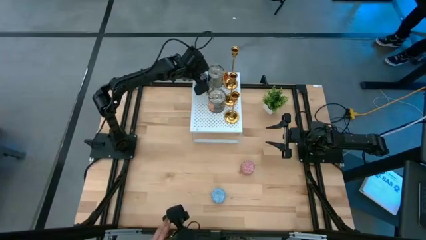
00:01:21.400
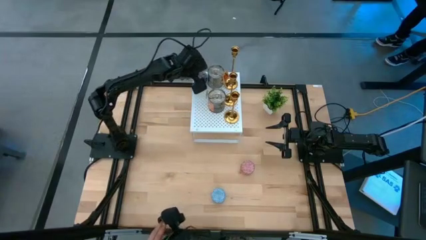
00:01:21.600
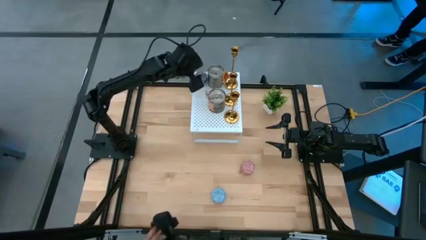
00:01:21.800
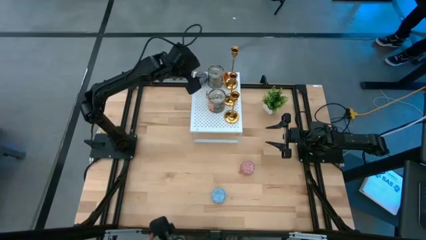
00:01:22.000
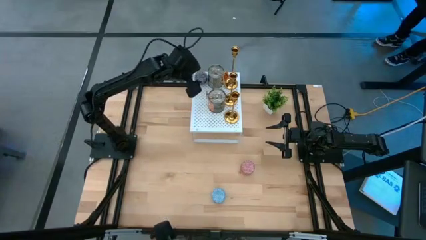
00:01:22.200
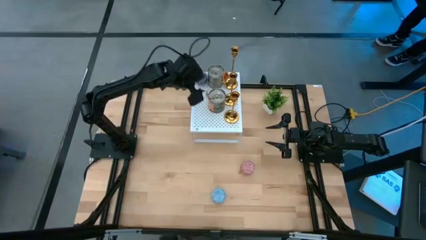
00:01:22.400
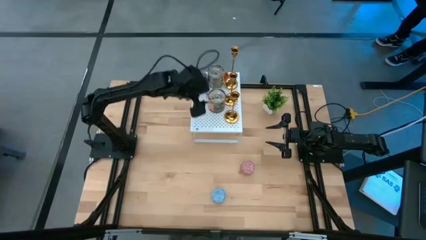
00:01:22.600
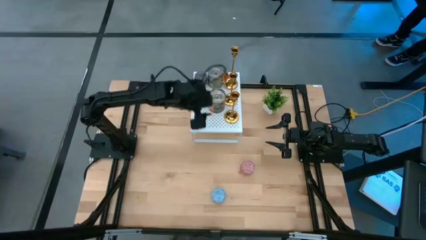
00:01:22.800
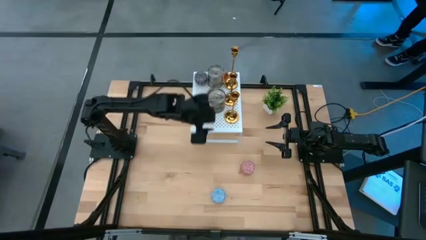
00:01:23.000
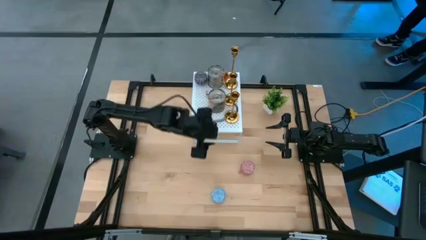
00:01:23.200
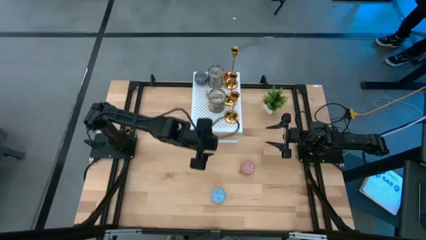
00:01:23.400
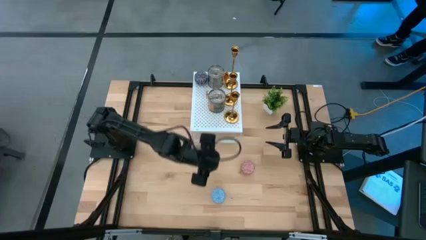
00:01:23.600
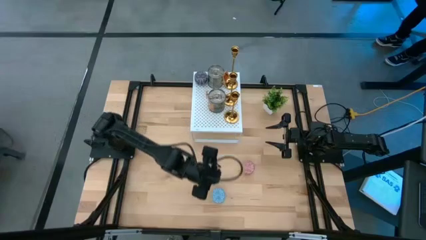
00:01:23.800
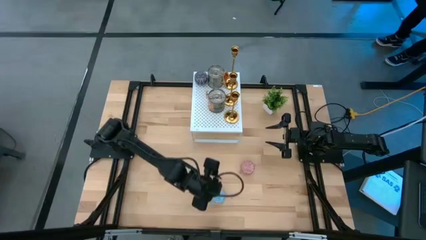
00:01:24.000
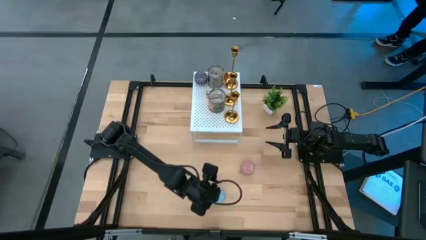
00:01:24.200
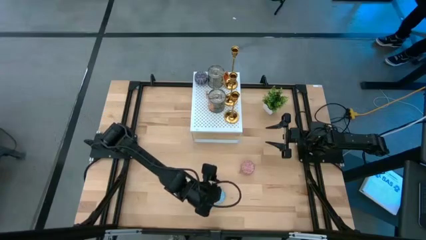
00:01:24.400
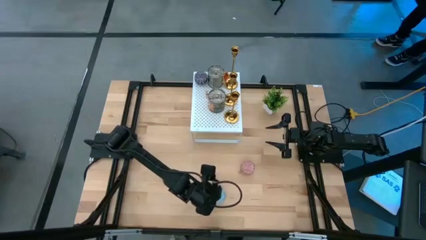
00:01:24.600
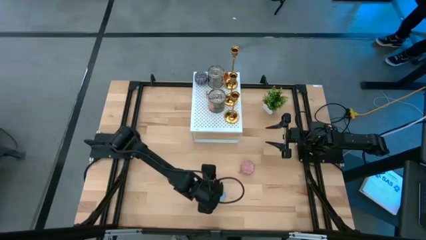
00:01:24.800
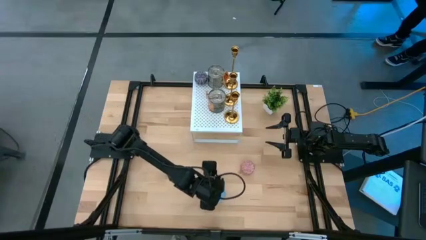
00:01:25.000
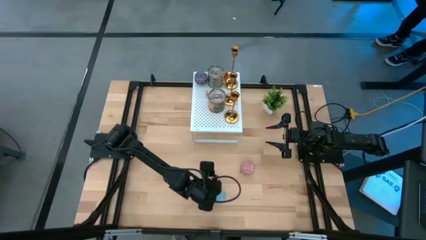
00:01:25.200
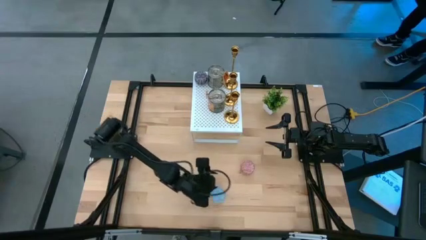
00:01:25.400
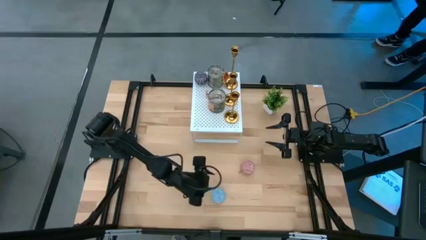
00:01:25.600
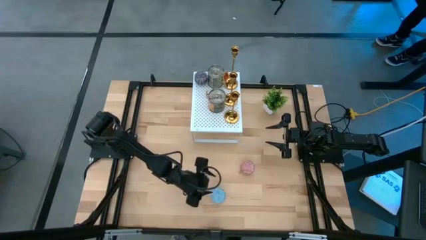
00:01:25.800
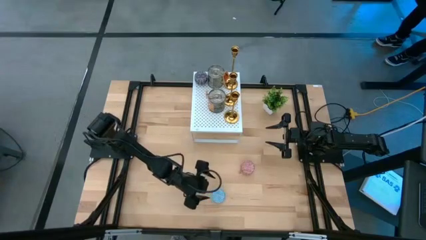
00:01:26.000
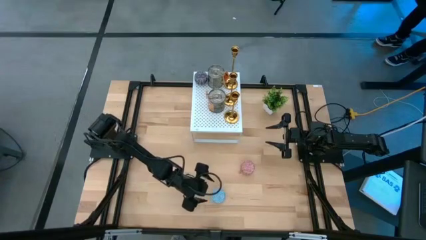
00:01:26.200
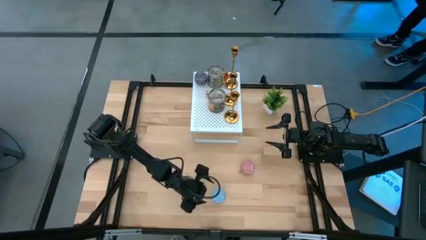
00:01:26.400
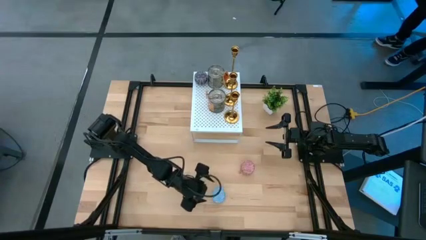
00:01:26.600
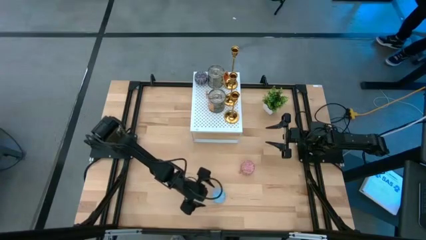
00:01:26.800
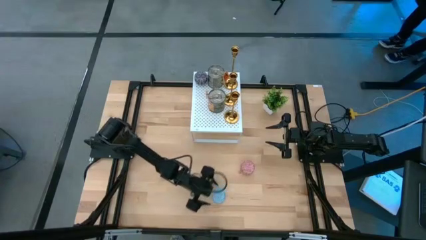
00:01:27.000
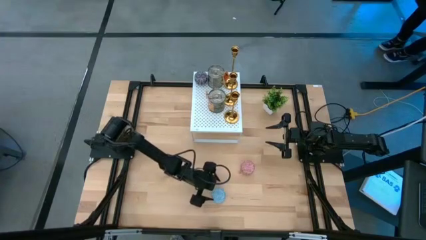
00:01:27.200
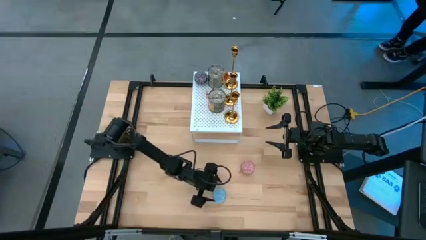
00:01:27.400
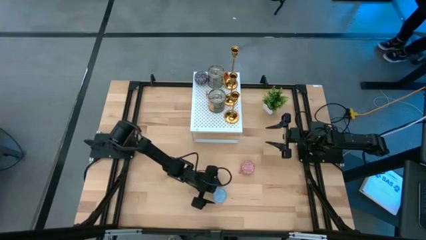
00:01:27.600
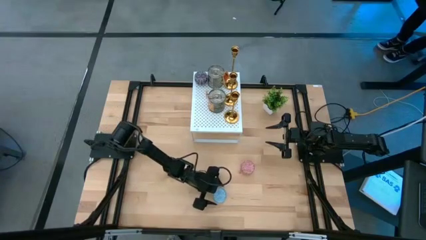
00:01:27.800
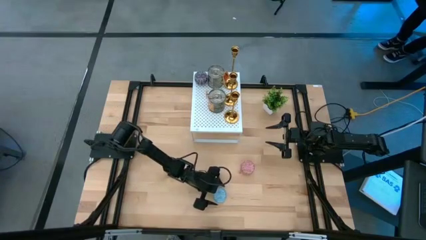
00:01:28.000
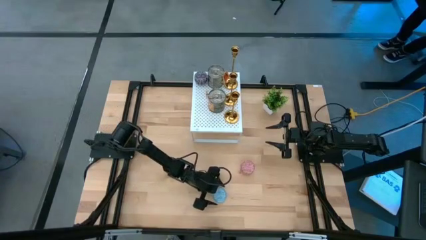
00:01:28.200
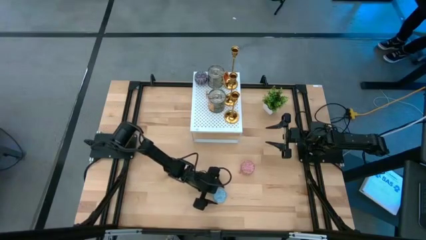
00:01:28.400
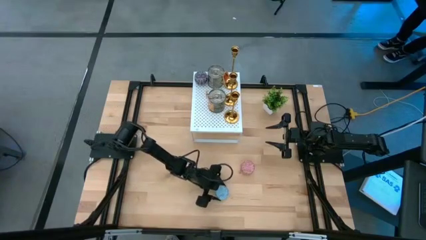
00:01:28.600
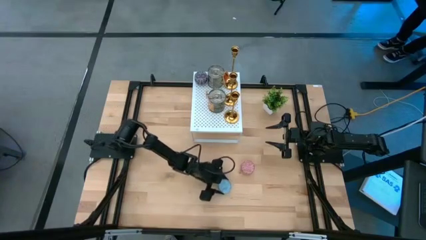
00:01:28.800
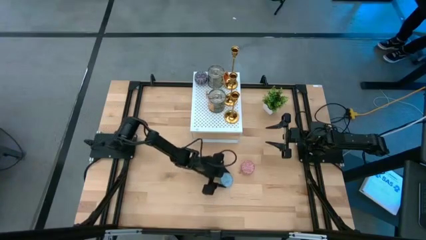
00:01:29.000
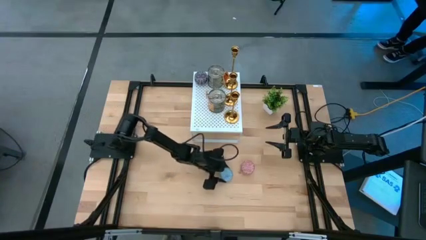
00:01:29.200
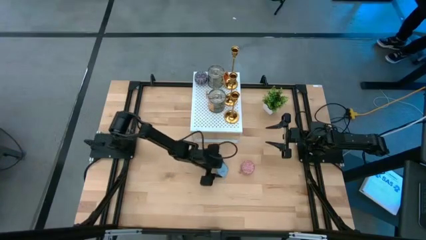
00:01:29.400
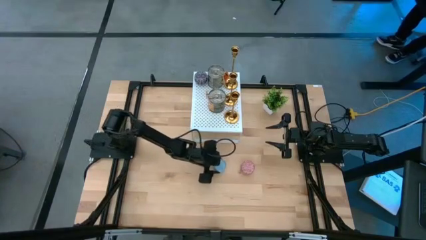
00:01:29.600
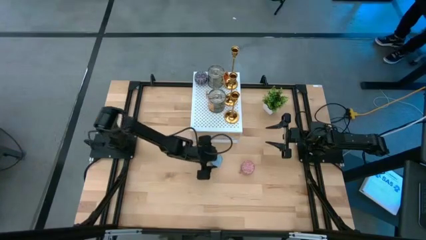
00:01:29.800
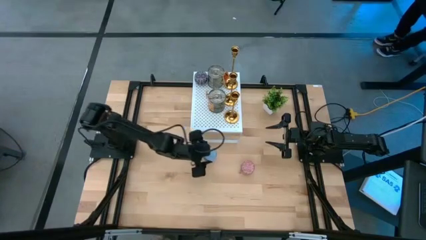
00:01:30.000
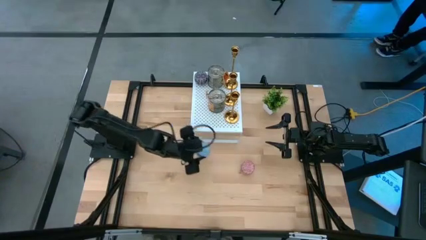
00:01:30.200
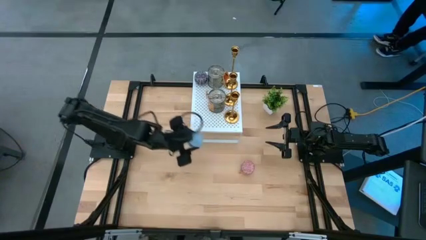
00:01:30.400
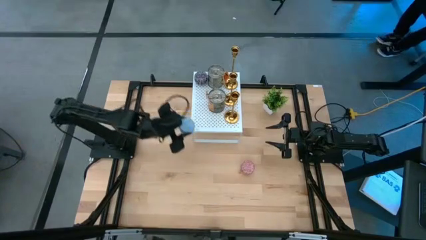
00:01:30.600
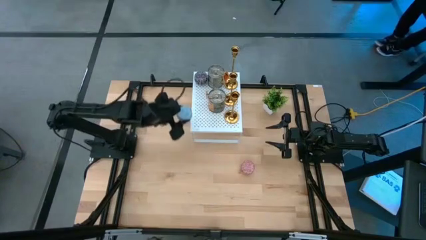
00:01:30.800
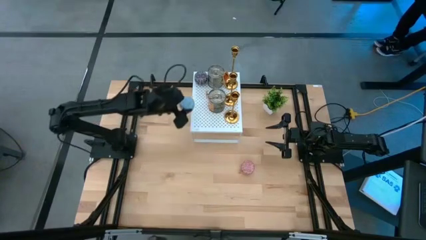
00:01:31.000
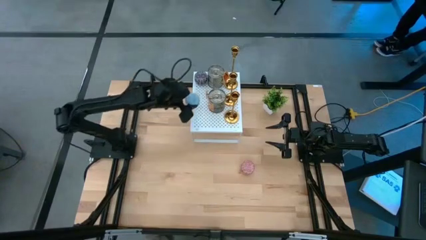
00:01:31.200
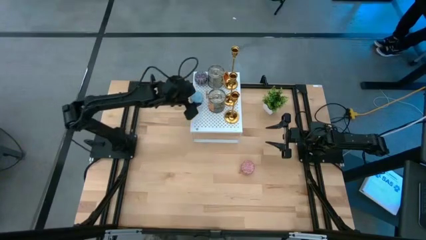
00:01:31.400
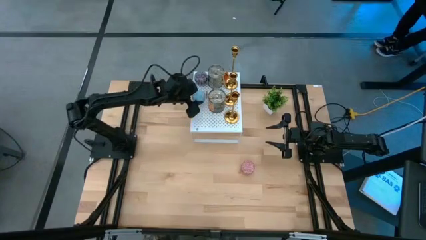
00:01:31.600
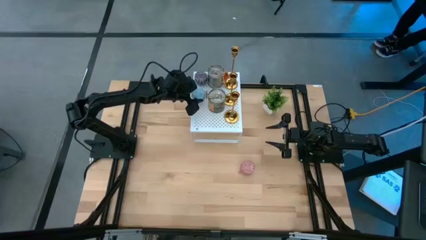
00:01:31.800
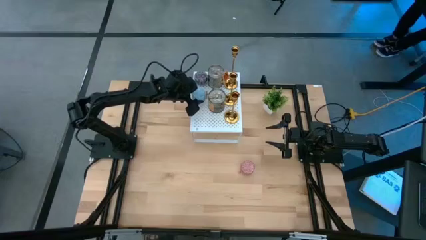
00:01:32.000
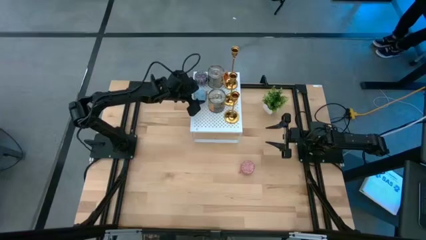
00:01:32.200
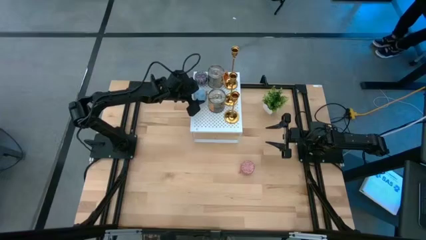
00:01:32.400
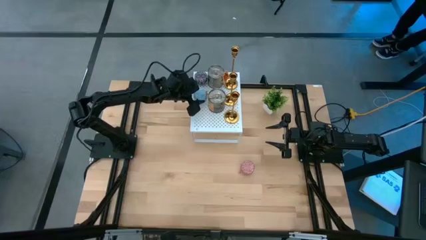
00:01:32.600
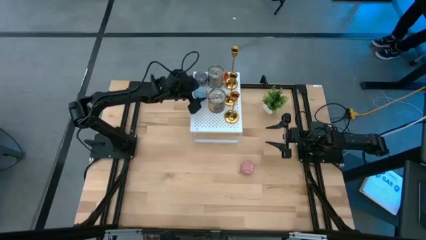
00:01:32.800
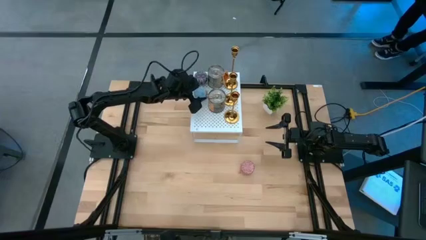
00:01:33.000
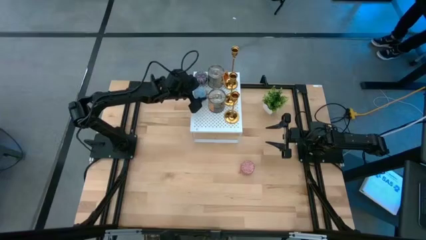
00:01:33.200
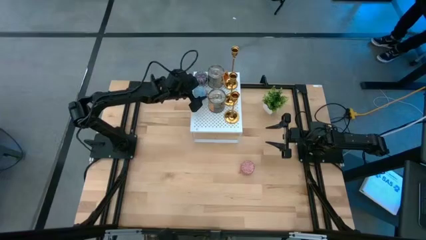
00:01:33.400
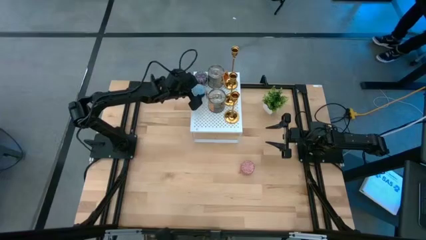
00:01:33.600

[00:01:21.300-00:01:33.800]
Task: Pick & Place candle stick holders
Put the blue patterned scented candle on the shelf

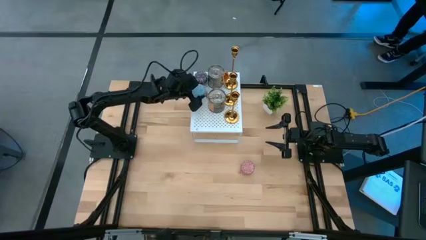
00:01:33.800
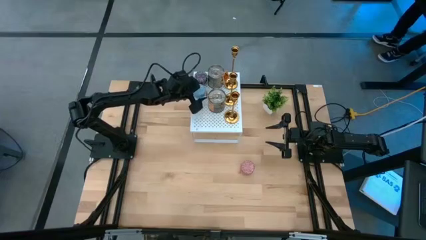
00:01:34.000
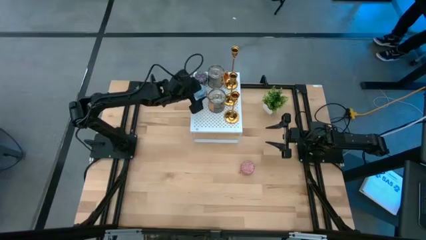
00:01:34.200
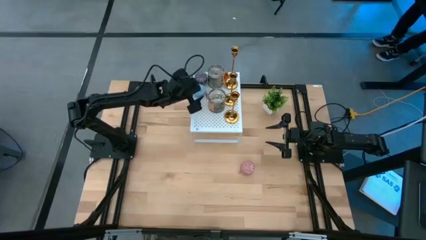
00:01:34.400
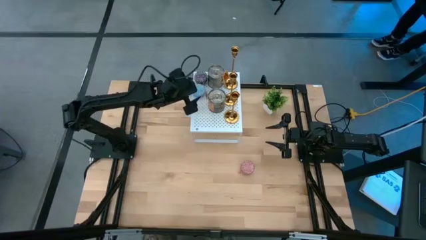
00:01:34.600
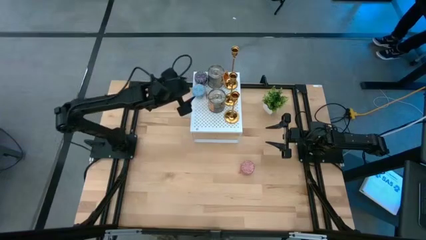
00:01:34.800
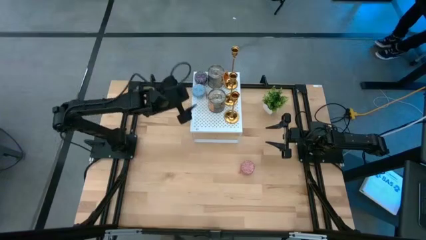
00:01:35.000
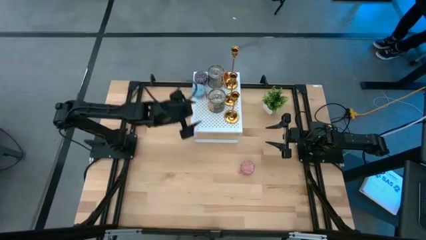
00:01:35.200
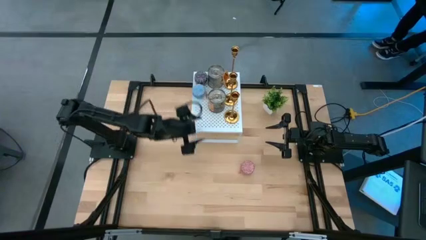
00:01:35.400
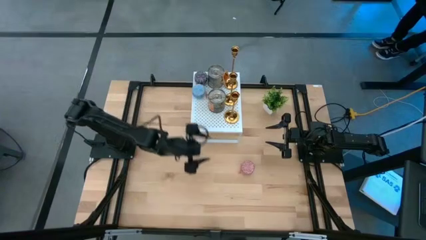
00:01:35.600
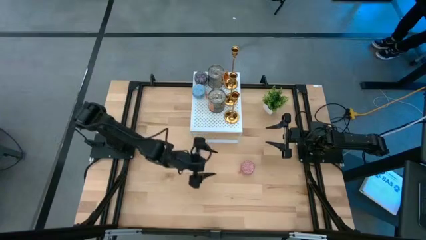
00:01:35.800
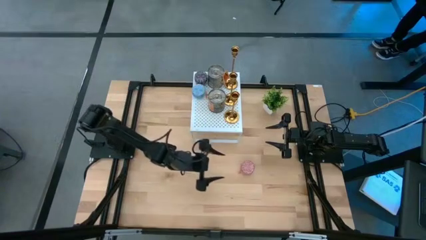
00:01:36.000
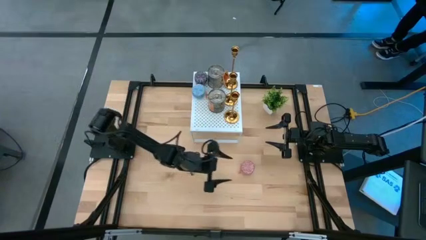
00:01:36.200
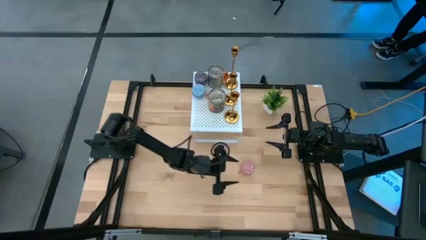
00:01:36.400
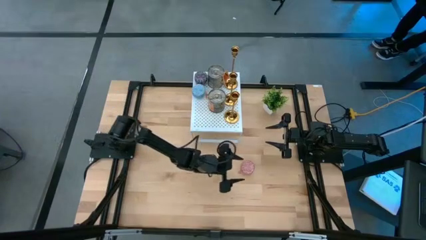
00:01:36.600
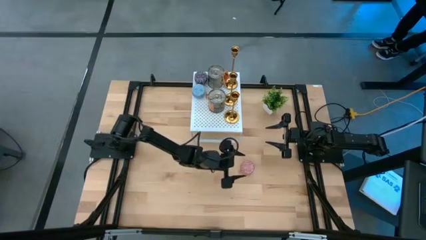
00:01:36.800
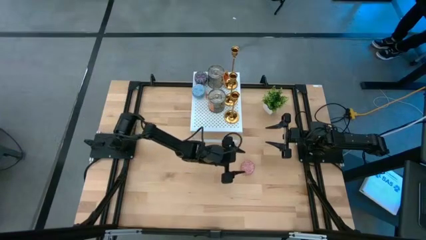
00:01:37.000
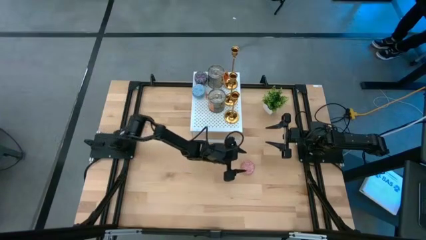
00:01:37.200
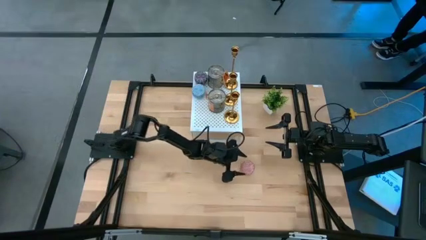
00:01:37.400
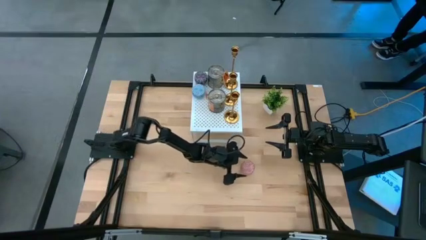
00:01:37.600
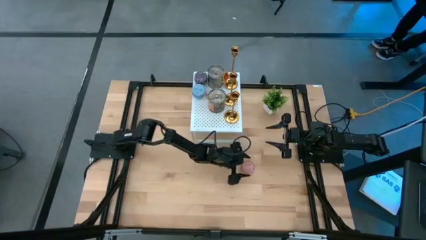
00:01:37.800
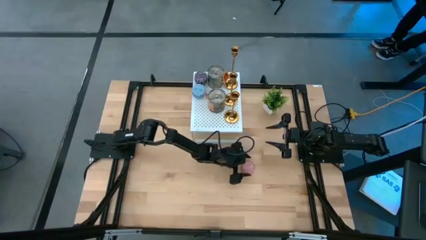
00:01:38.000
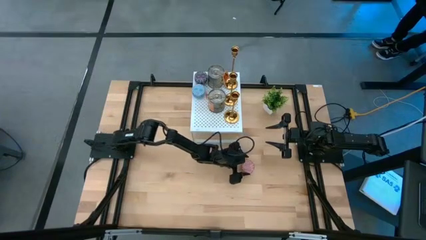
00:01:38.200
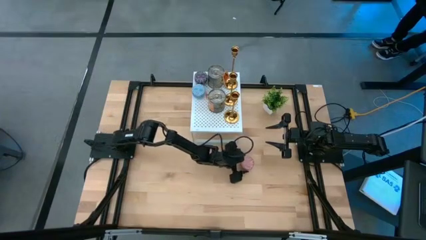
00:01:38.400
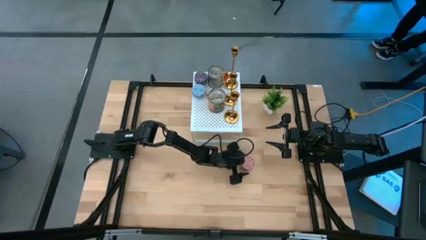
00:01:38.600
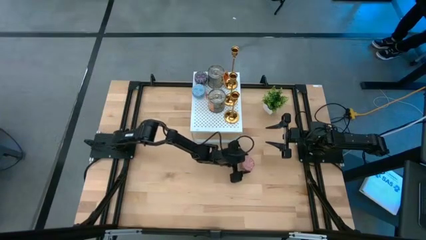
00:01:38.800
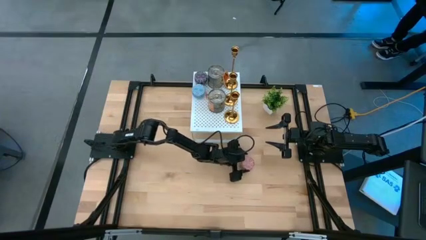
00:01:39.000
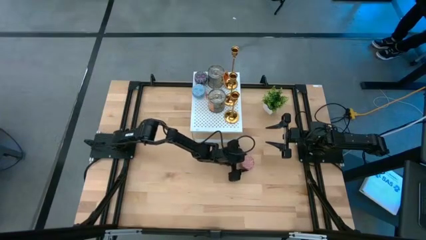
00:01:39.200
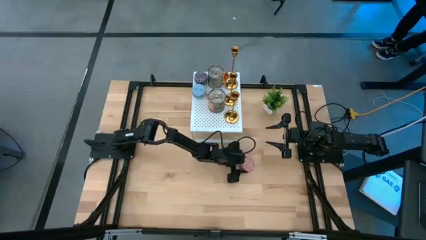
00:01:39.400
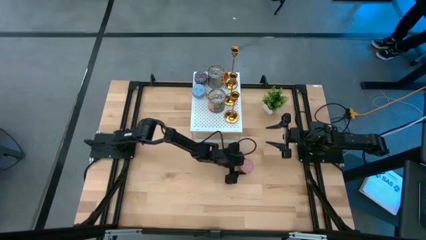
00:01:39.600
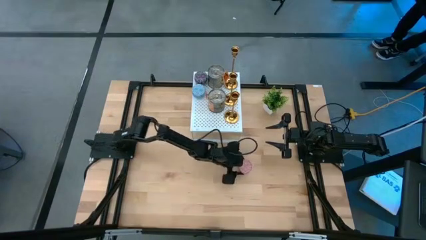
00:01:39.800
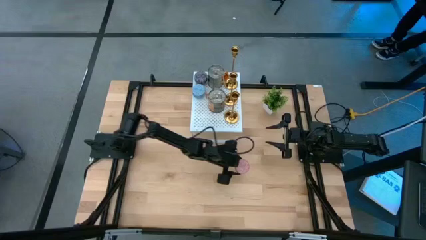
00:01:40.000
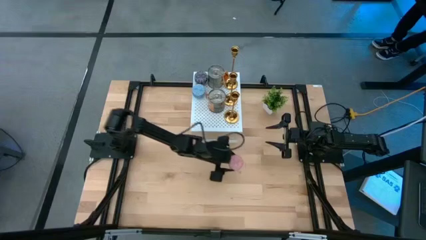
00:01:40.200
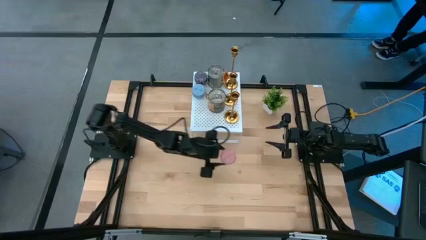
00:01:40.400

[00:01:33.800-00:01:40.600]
Put the pink patterned scented candle on the shelf
